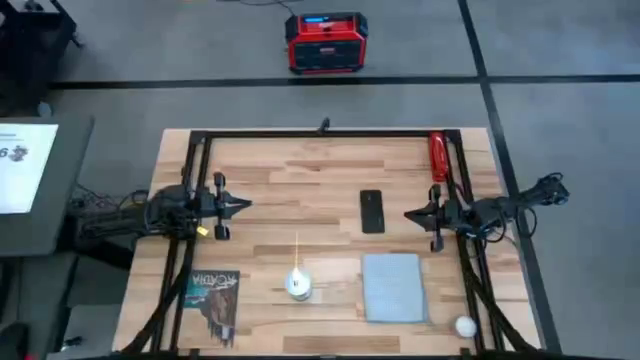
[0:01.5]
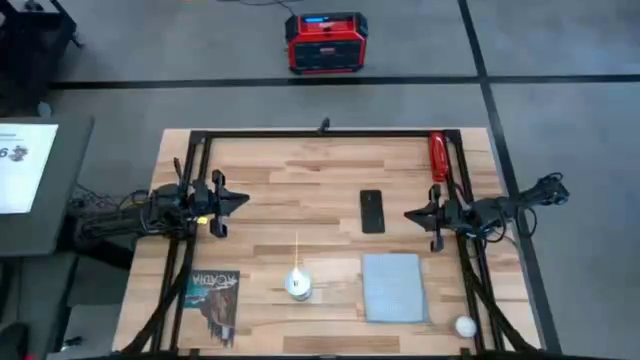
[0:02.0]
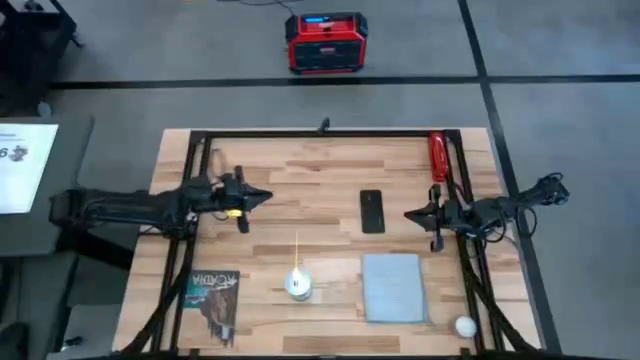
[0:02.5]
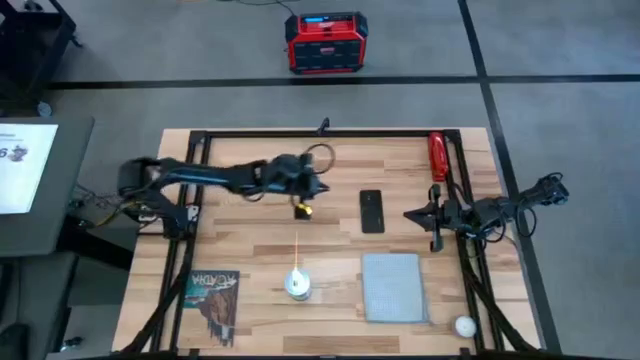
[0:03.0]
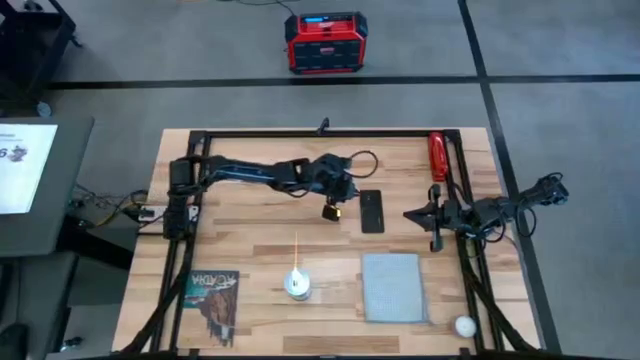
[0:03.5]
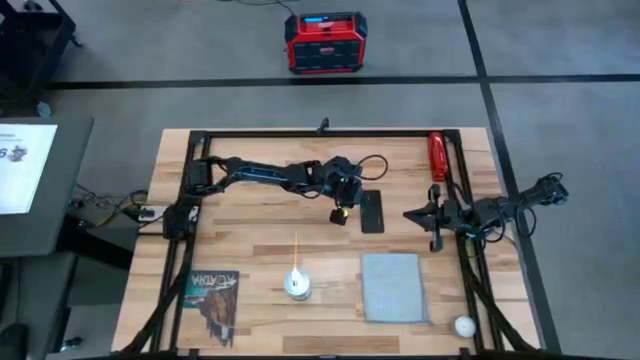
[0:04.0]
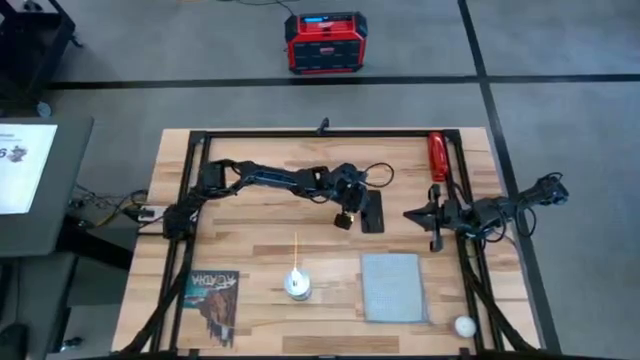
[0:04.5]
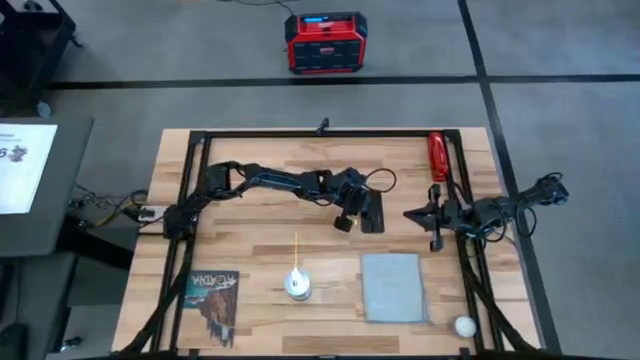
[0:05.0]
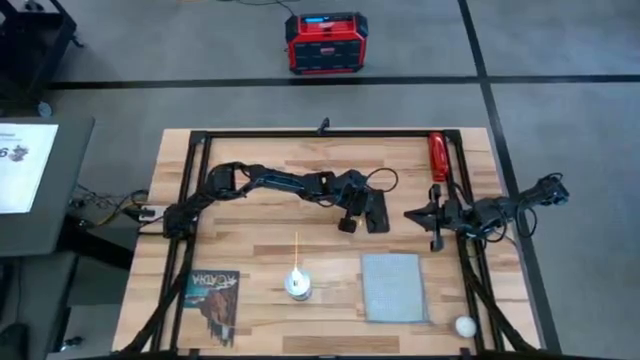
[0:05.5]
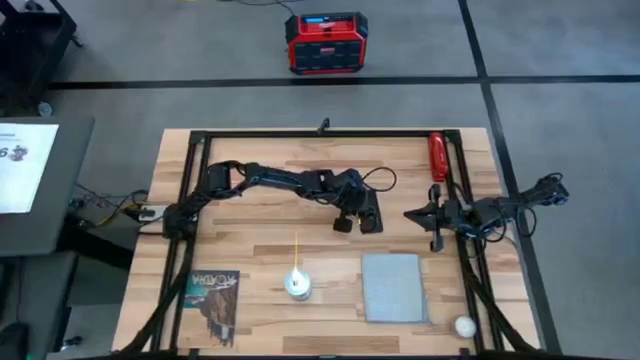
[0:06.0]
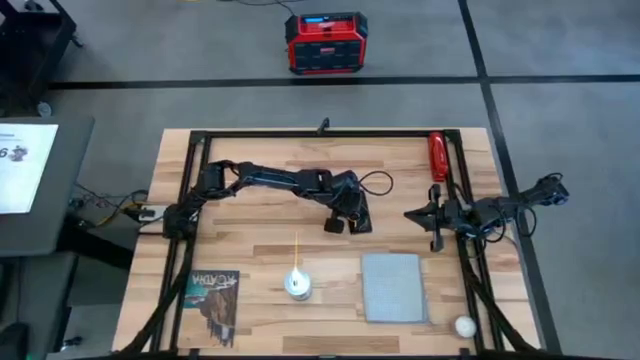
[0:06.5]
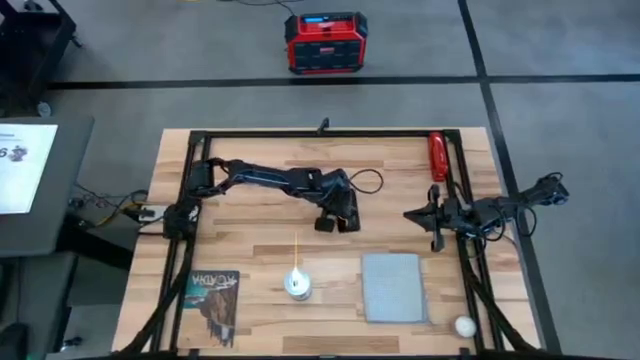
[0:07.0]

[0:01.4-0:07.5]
Task: Apply microfiber cloth
Prepare the black phone to the center

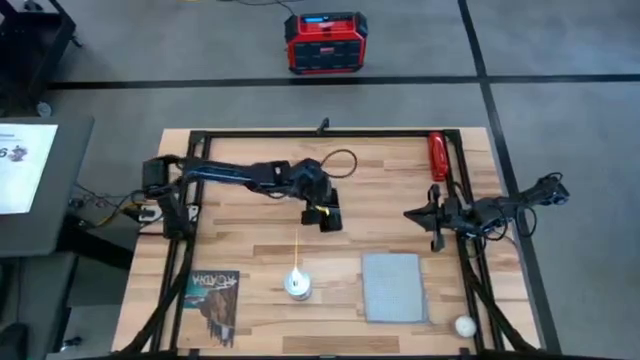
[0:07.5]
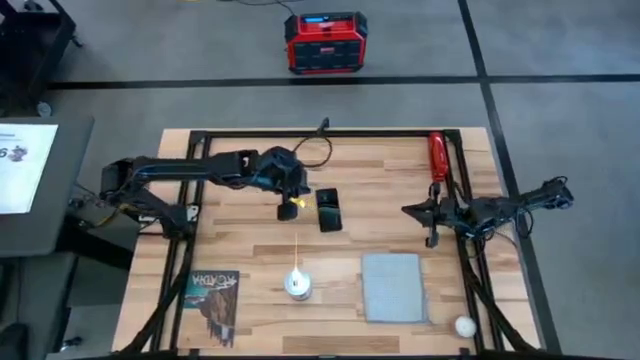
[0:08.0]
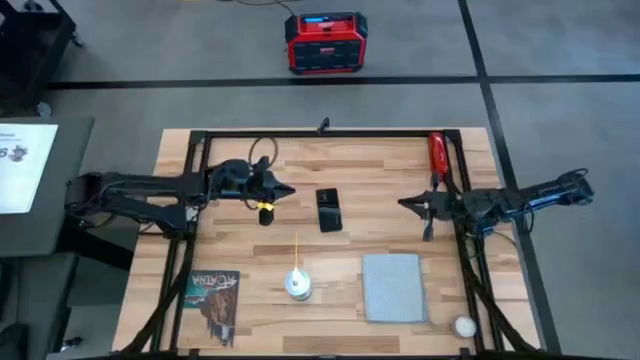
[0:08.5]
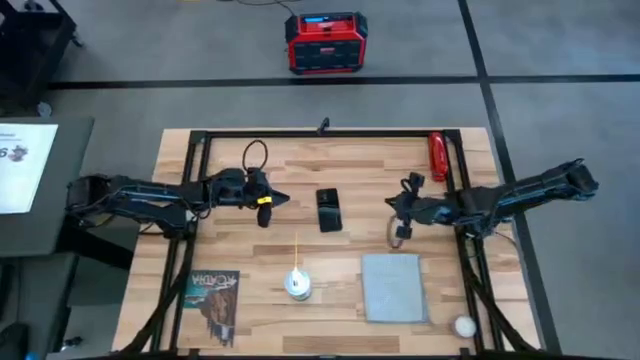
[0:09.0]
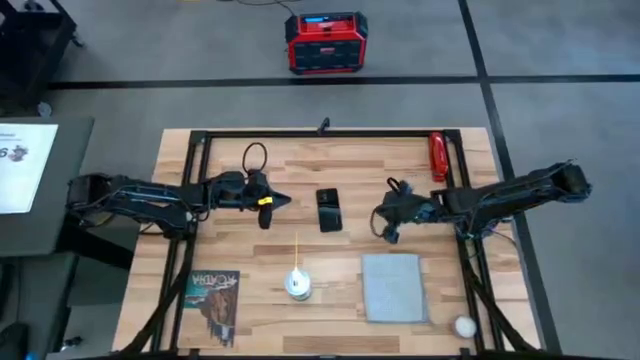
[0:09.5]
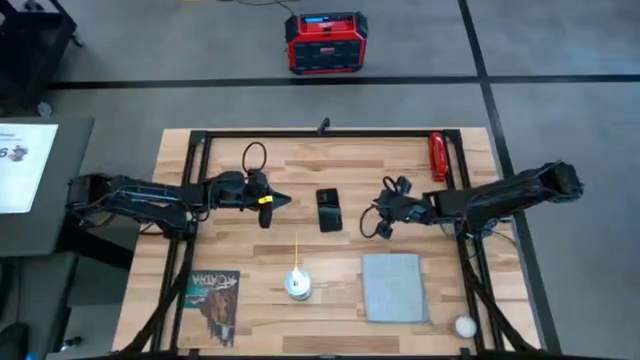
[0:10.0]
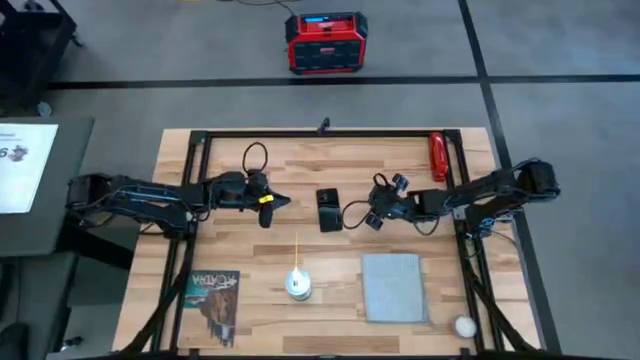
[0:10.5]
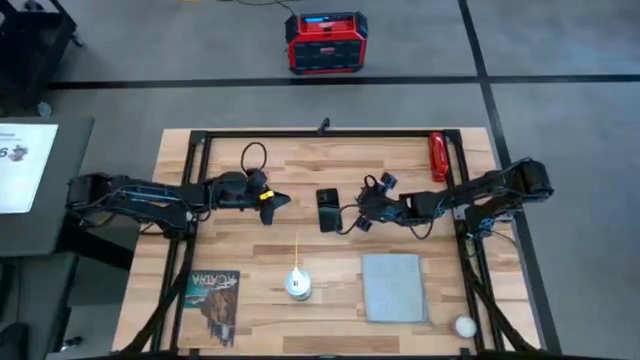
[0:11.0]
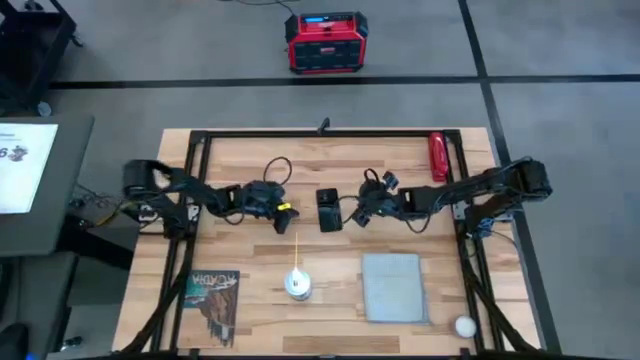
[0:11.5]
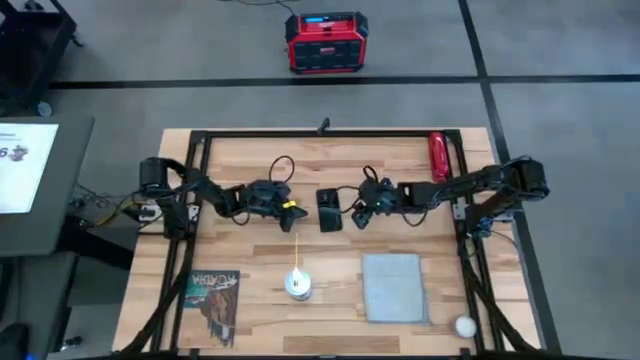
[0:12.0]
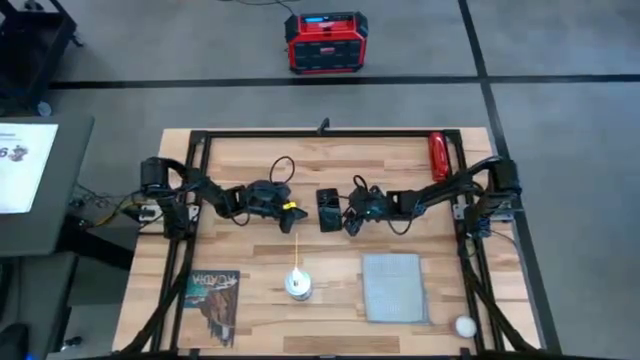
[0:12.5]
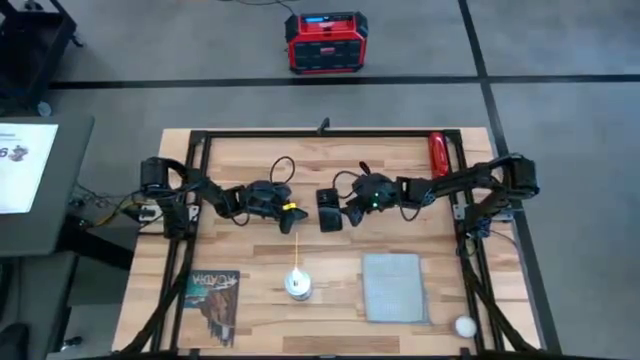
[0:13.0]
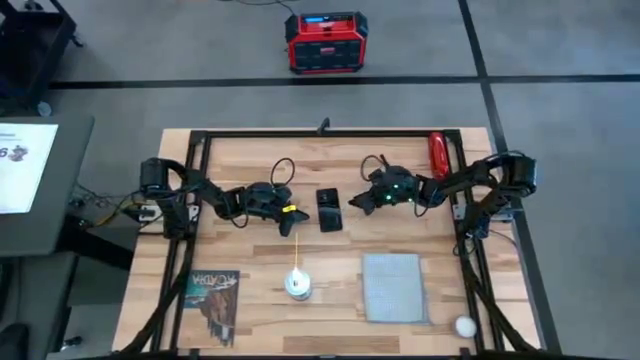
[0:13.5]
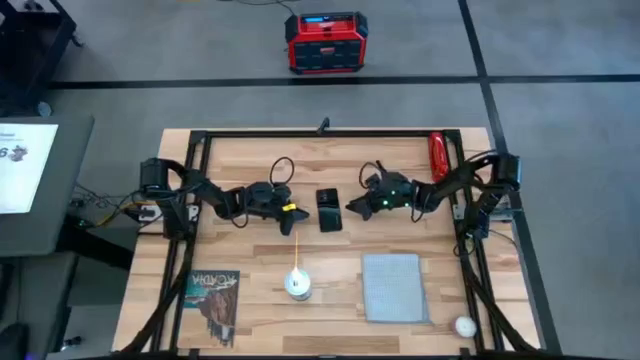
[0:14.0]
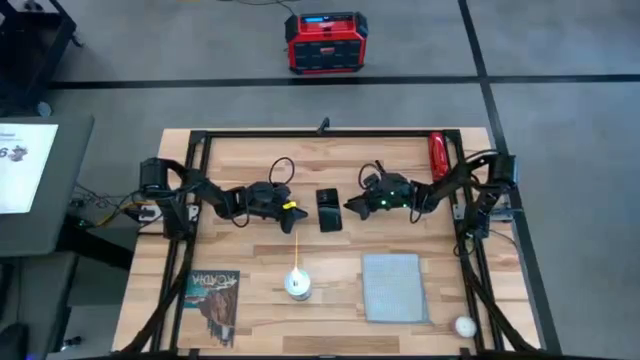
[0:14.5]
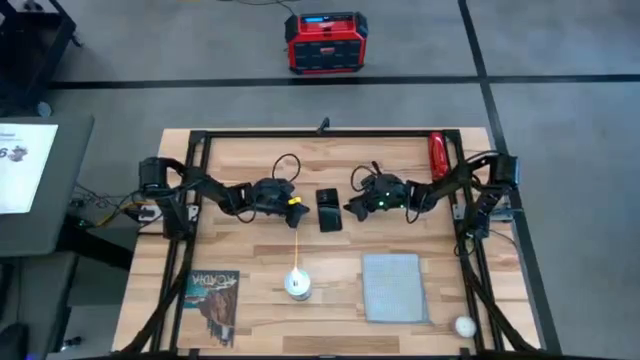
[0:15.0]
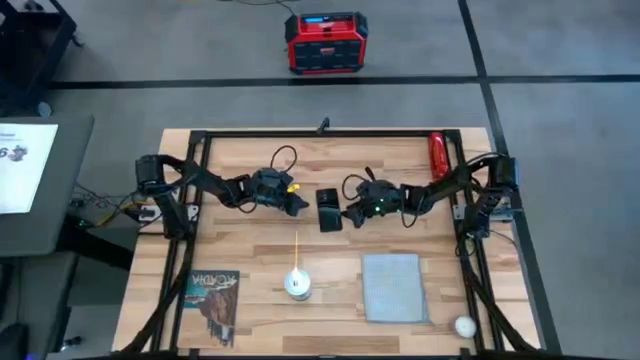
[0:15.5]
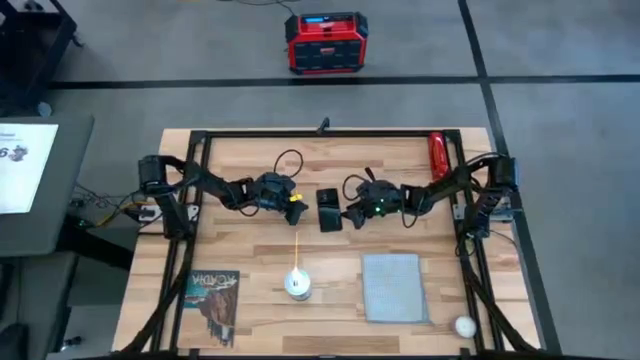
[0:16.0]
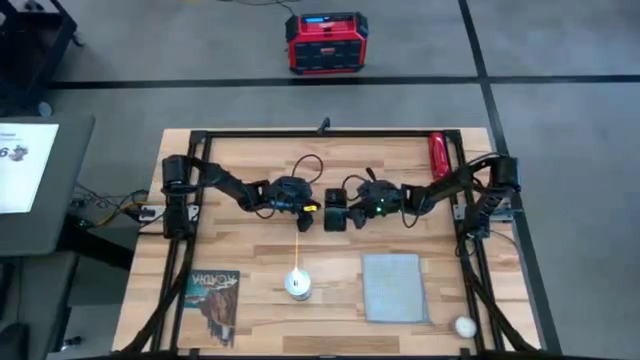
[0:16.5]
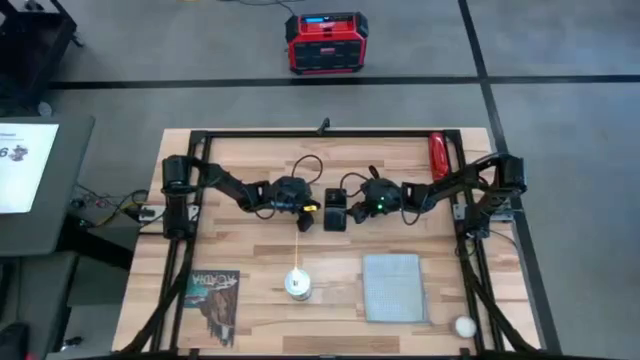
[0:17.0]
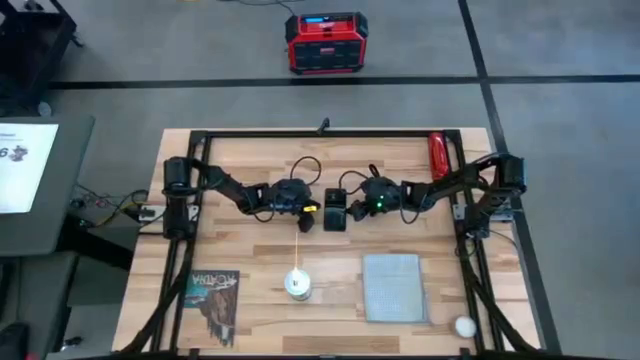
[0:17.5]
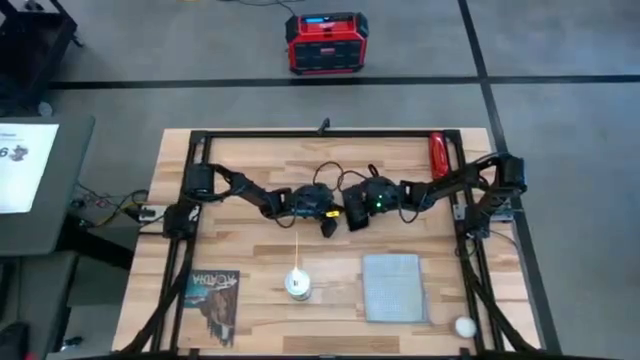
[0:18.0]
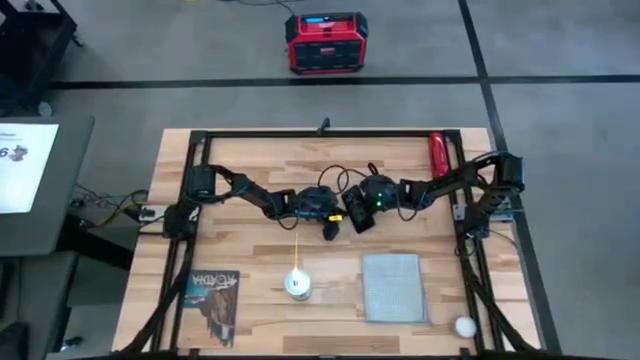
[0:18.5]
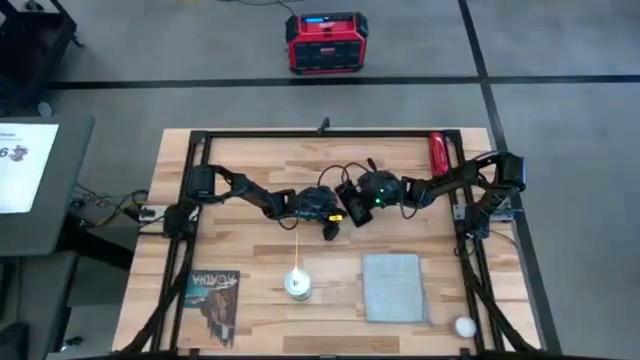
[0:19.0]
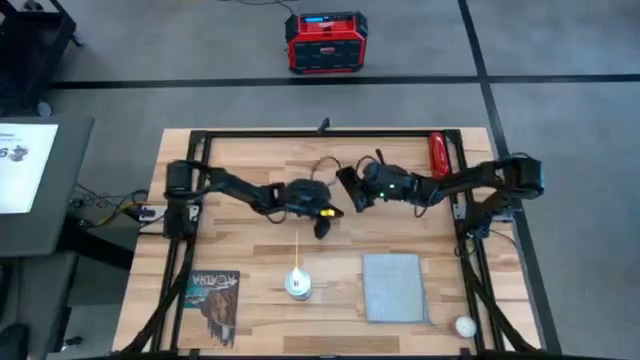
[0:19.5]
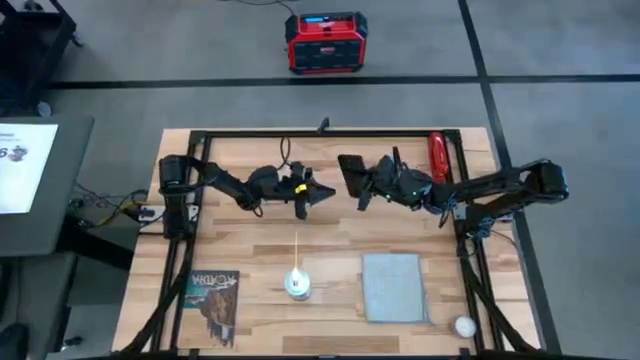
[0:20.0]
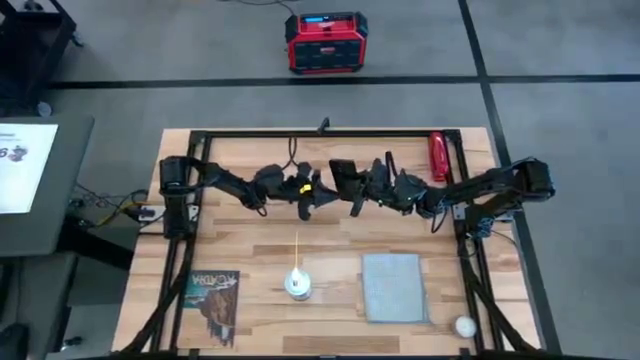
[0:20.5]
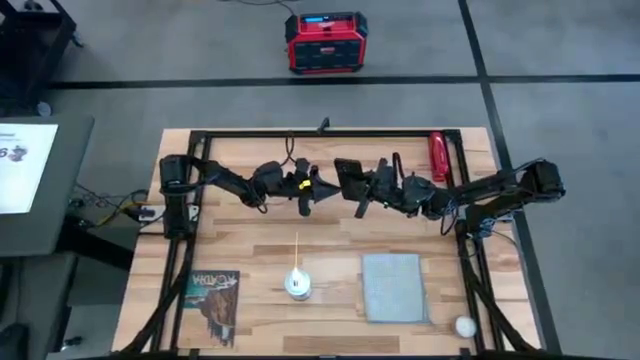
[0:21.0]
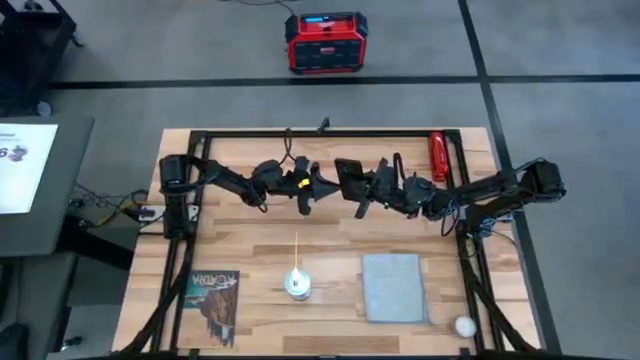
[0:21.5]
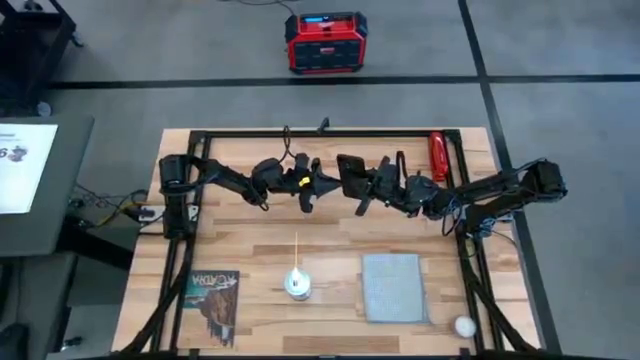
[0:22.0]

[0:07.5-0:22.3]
Spray the back of the cellphone using the spray bottle
